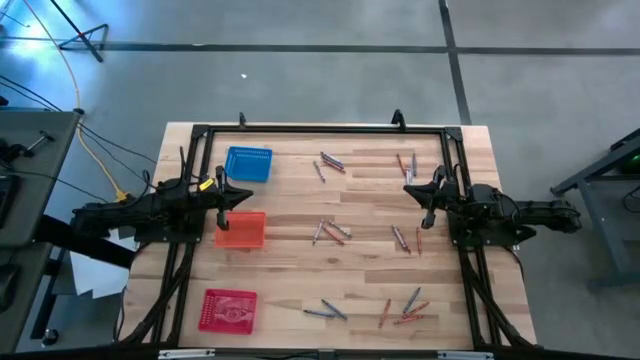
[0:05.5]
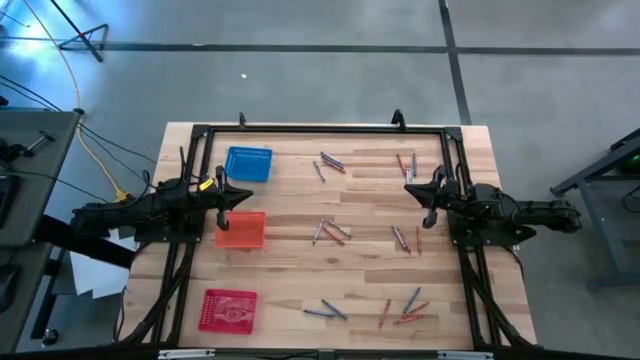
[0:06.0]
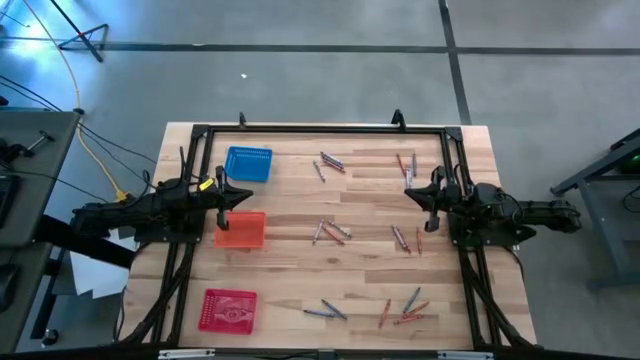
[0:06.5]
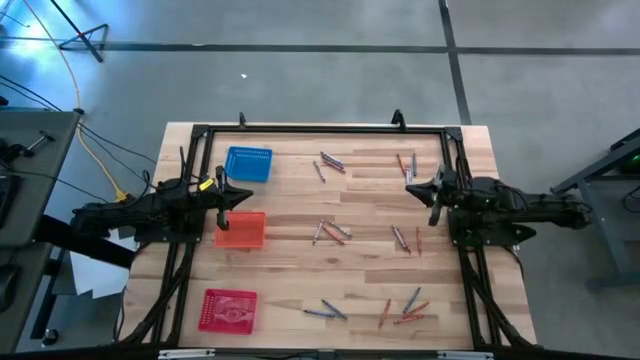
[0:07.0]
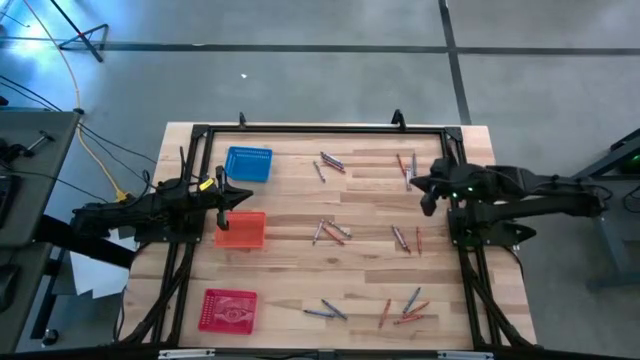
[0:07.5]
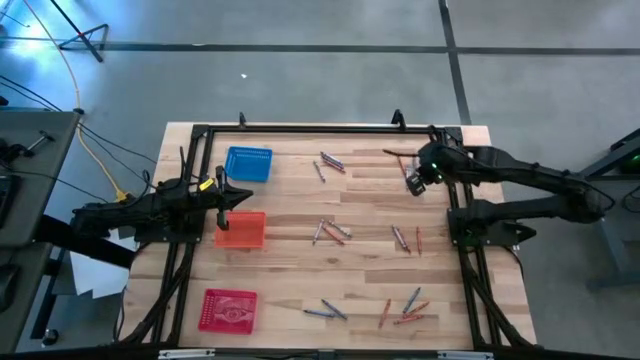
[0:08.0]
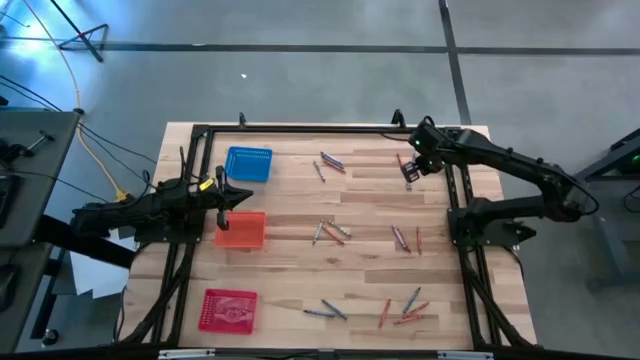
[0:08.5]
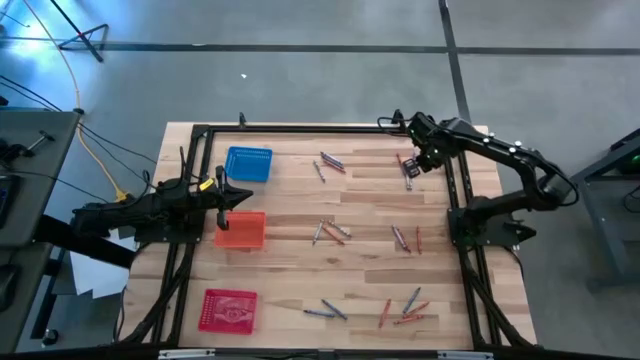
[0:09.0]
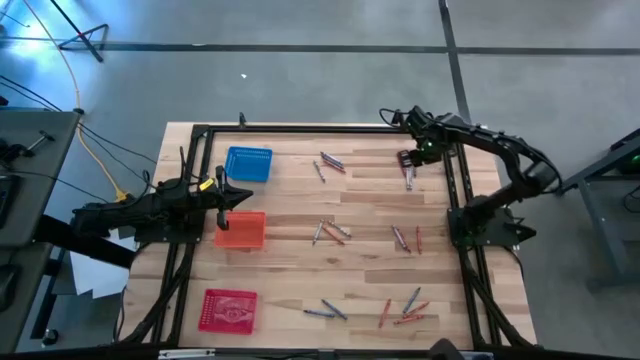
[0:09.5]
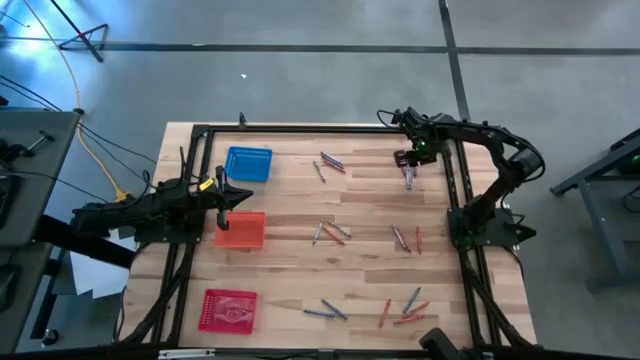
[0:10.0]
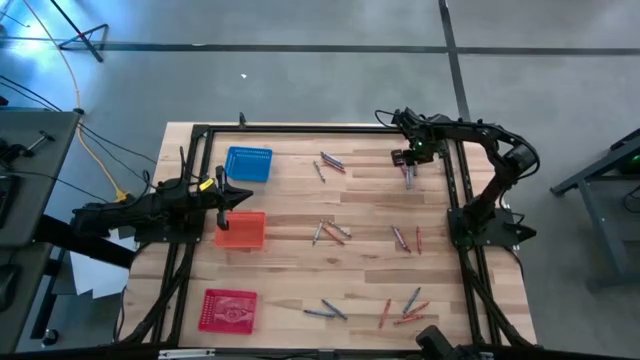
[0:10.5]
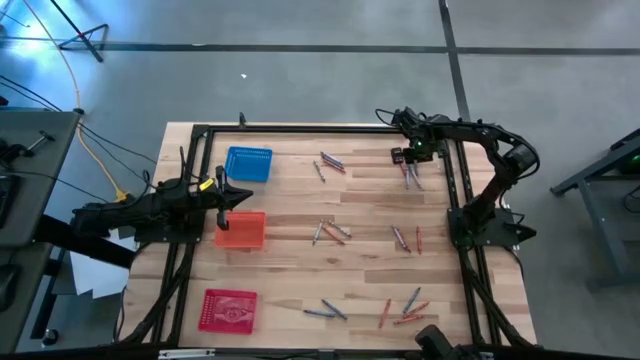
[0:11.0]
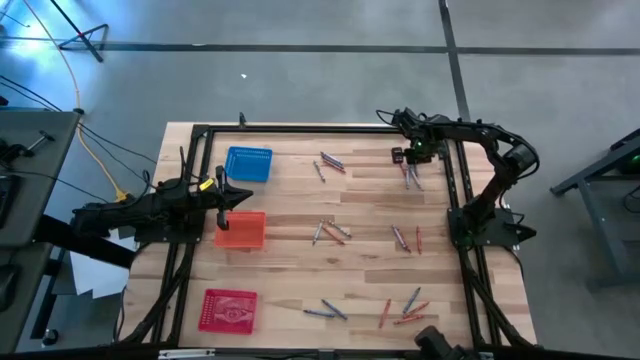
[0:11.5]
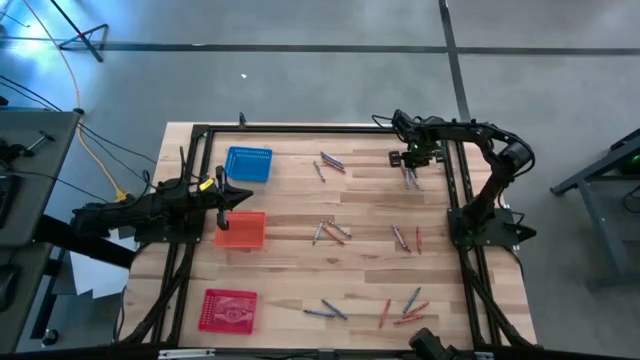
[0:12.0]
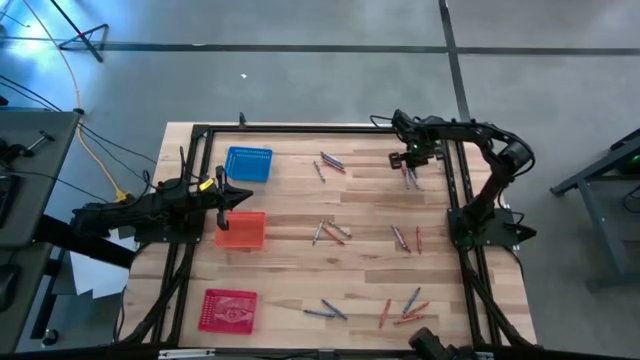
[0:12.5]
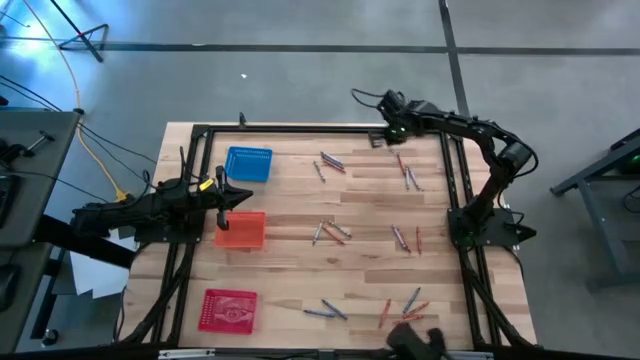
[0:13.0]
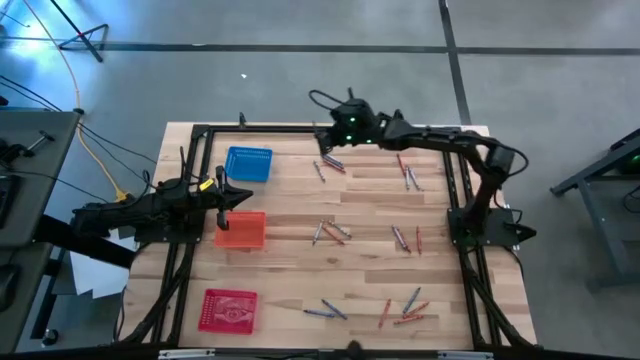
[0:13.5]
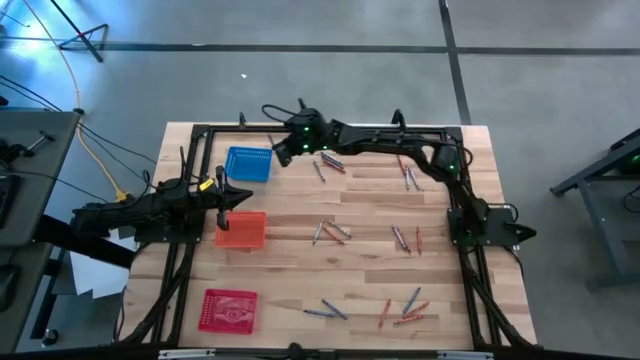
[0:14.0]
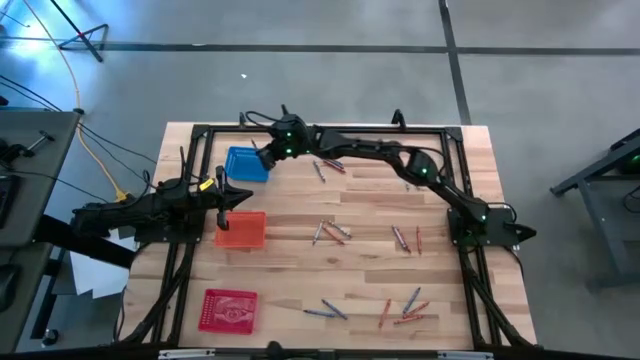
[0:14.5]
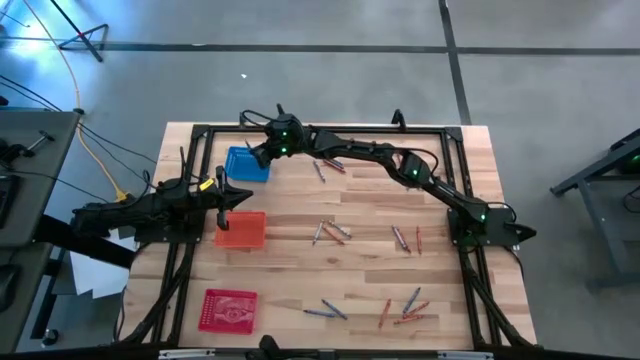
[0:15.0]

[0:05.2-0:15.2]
Task: Sort crayons
Put the blue crayon into the blue bin

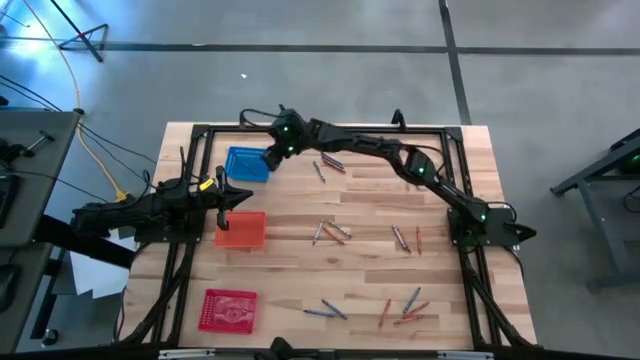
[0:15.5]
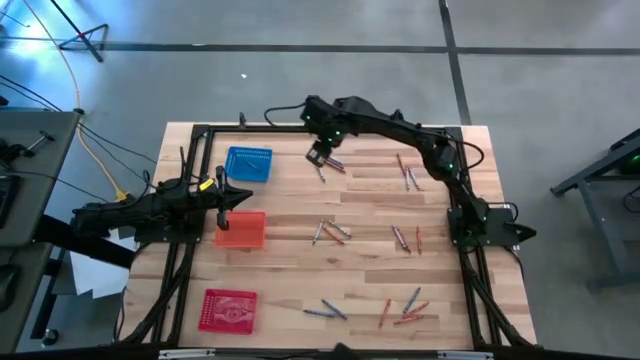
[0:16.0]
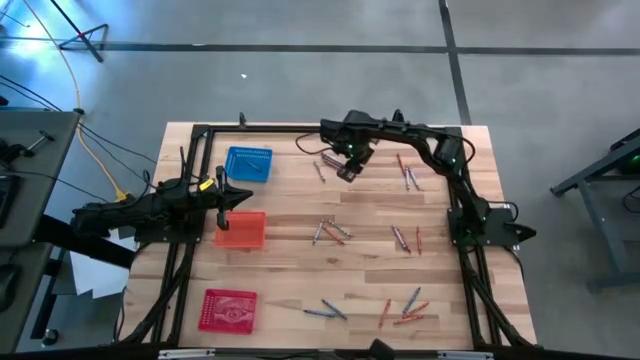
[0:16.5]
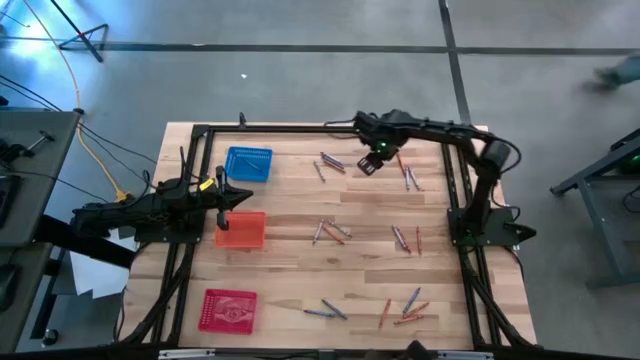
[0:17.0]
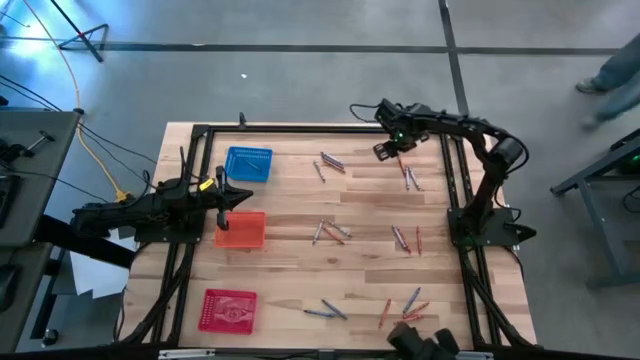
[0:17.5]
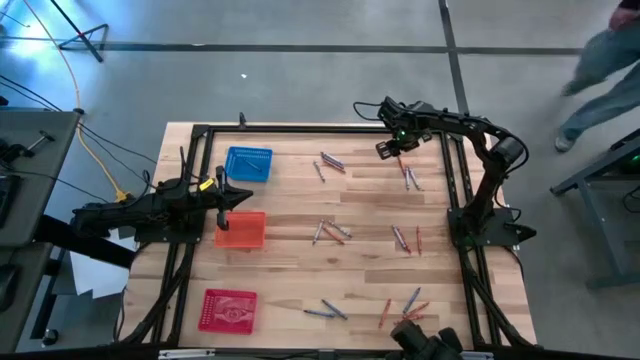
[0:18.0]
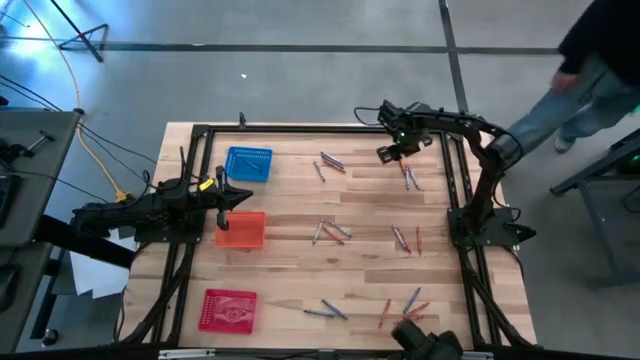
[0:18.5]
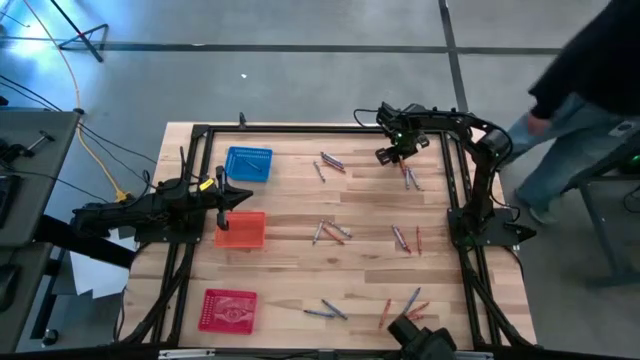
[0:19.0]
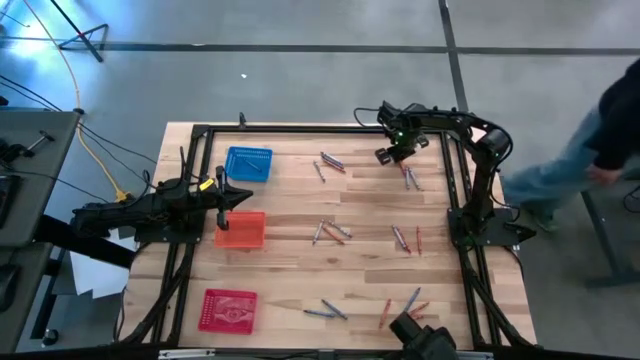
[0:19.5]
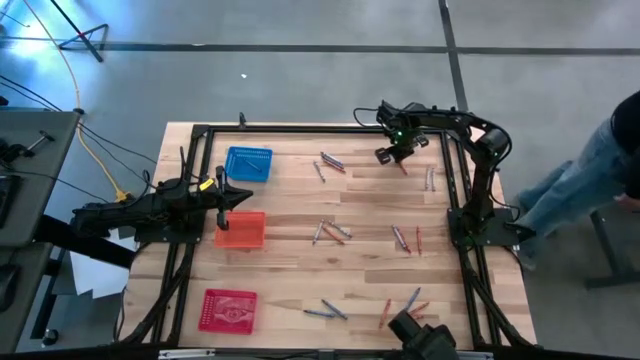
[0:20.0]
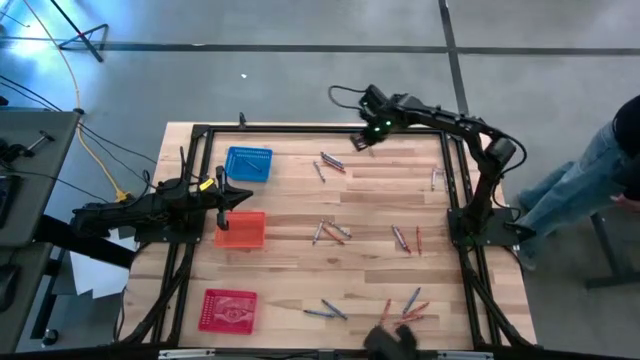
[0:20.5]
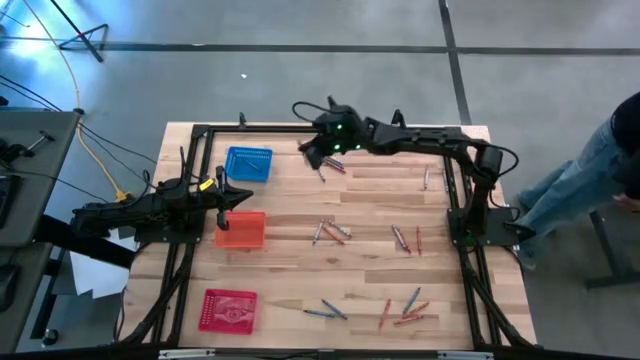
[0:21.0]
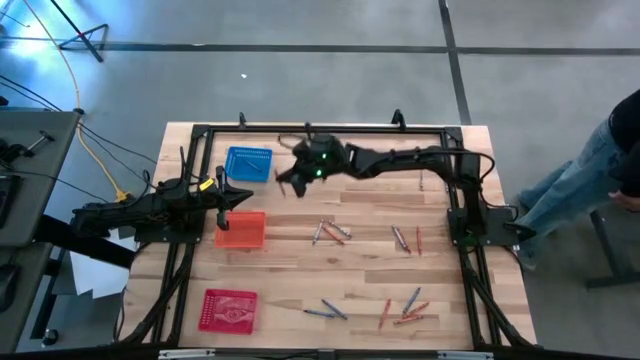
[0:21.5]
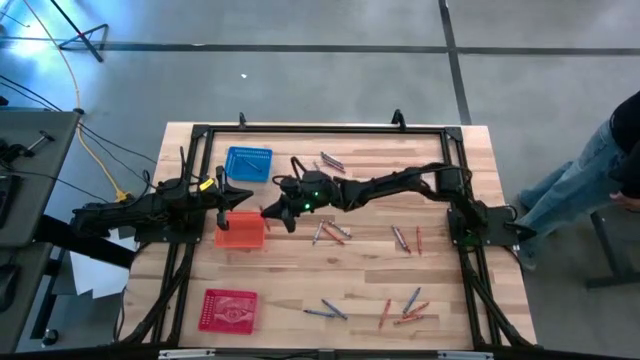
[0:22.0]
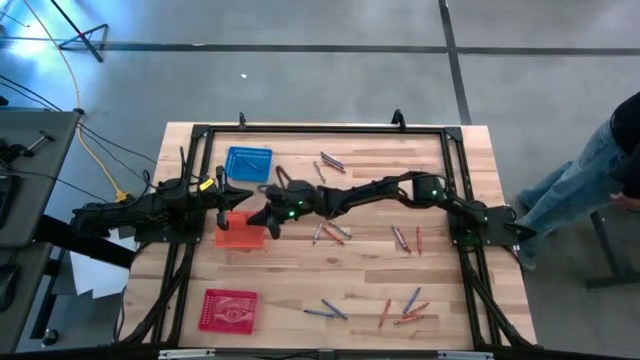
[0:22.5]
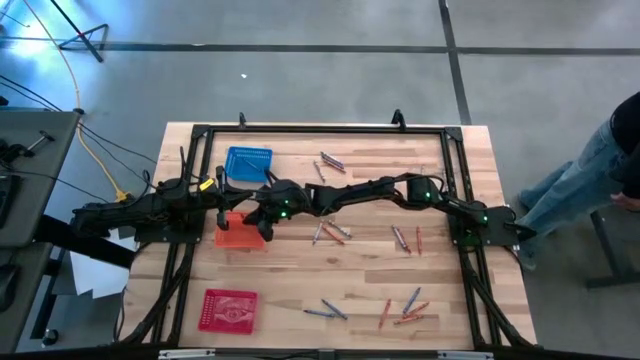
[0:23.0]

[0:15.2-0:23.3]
Put the orange crayon into the orange bin

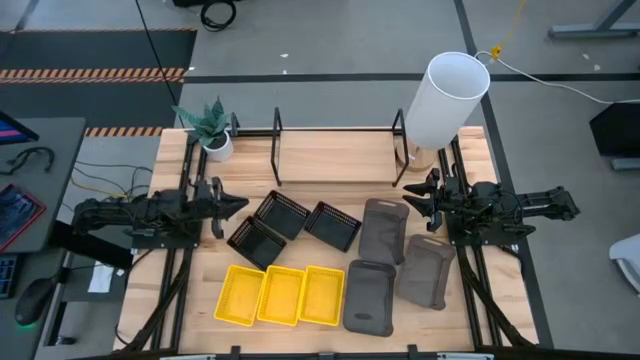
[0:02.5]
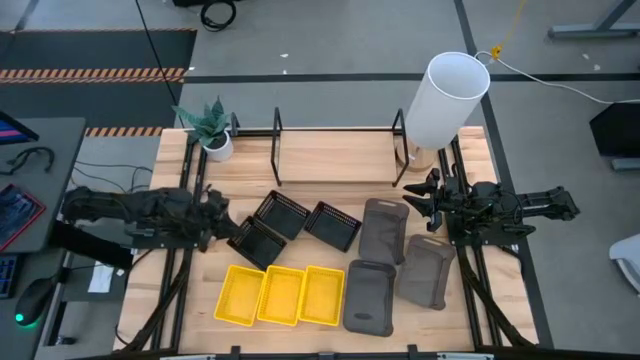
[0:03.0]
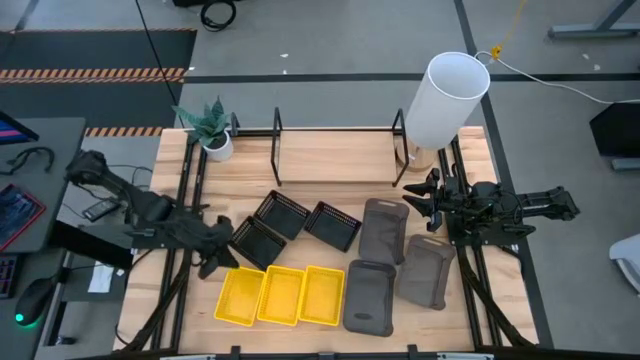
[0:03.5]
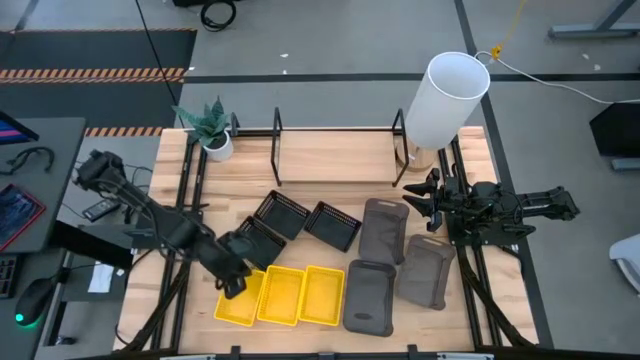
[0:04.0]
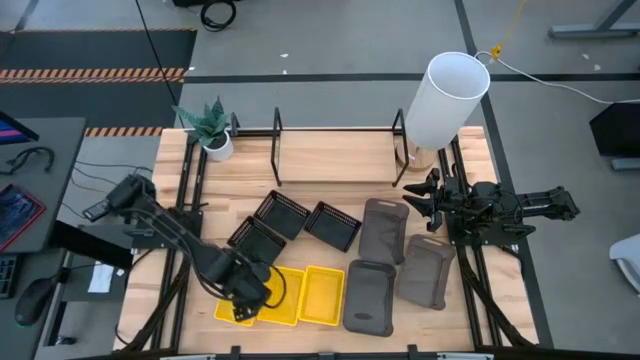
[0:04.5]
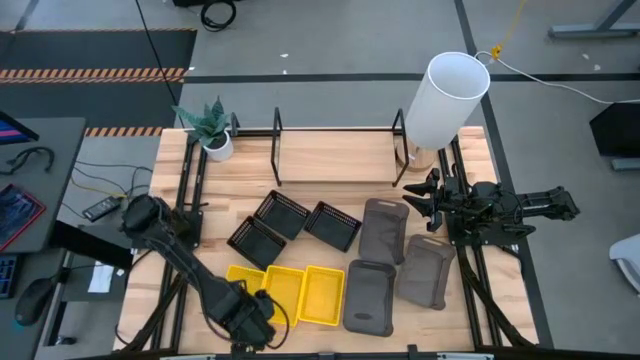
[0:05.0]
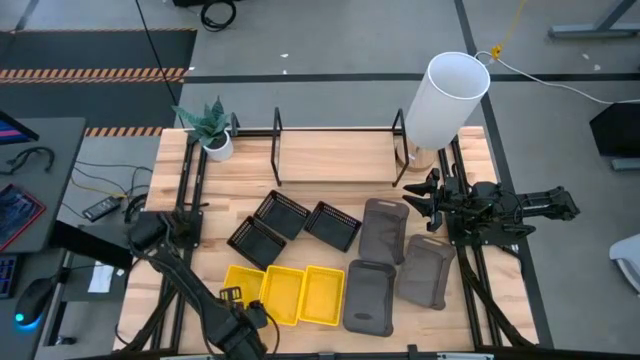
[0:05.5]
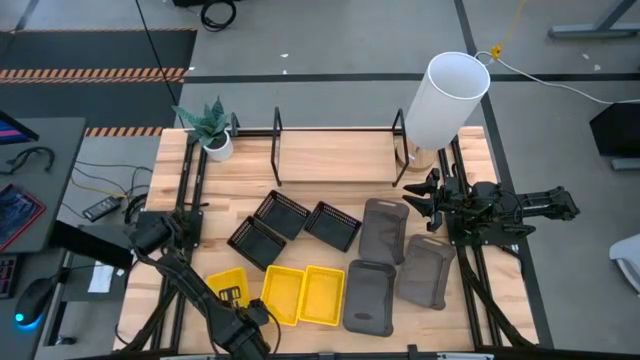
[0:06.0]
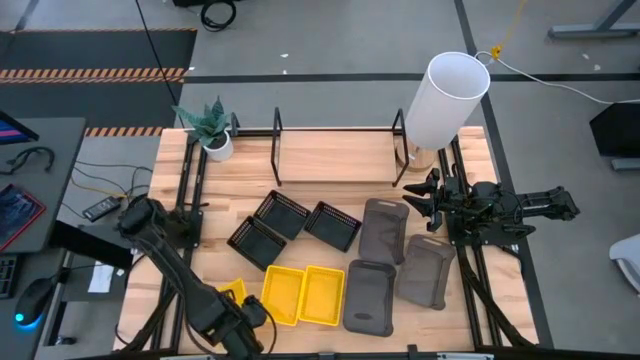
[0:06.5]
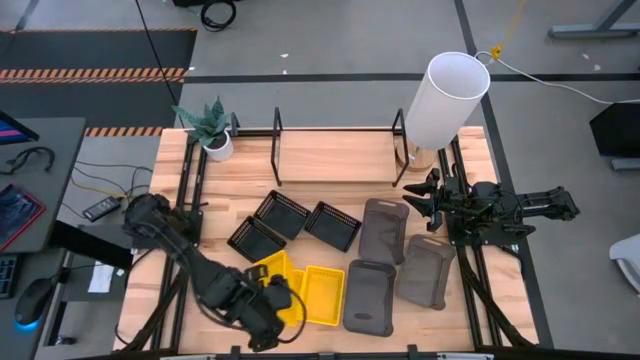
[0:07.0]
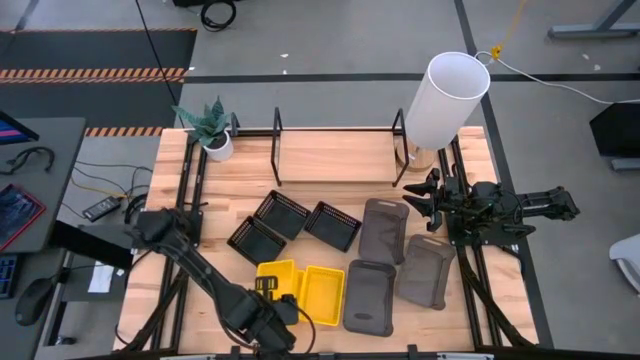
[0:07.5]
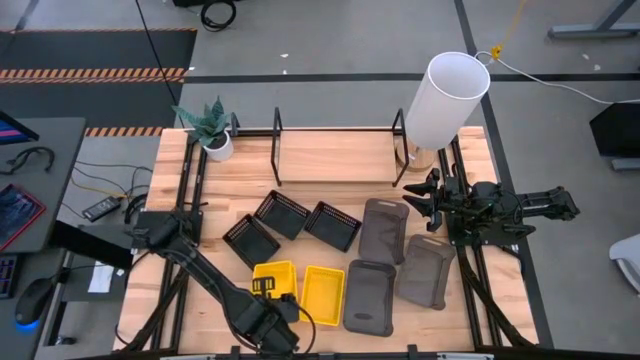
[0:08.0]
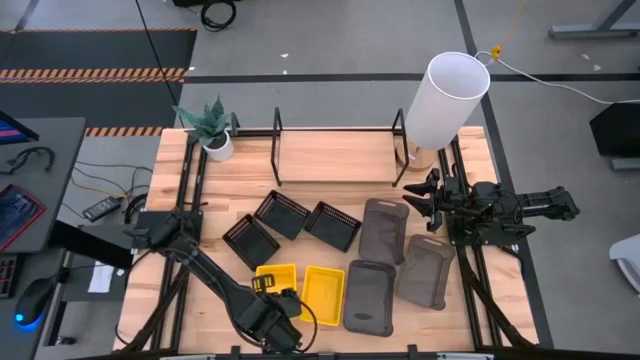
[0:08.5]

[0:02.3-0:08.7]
Task: Stack baskets on shelf by color
Stack the left yellow basket on top of the middle yellow basket
